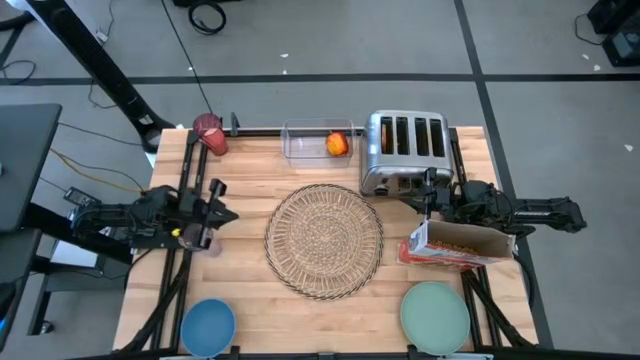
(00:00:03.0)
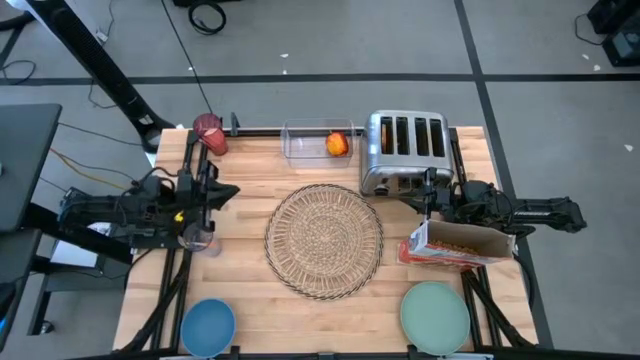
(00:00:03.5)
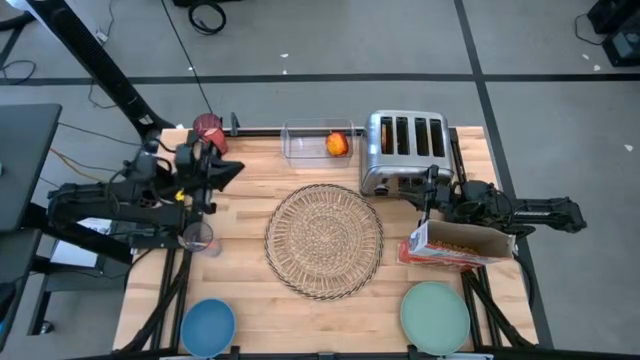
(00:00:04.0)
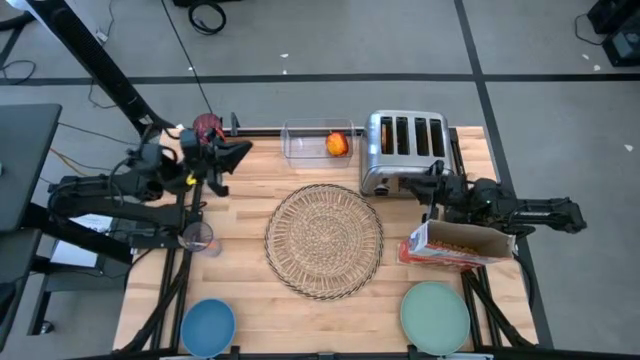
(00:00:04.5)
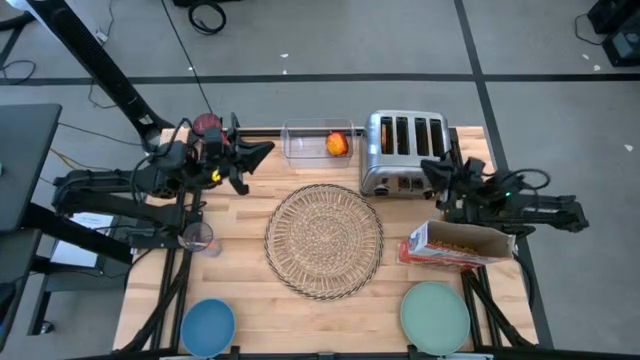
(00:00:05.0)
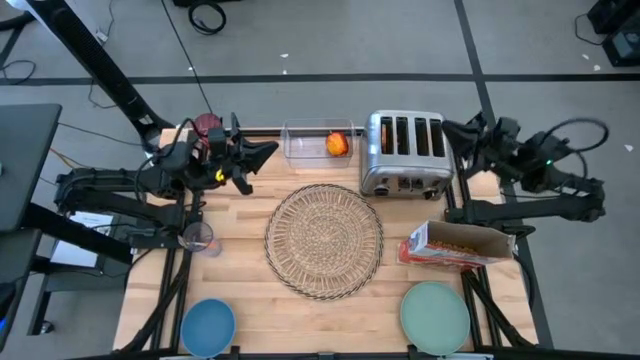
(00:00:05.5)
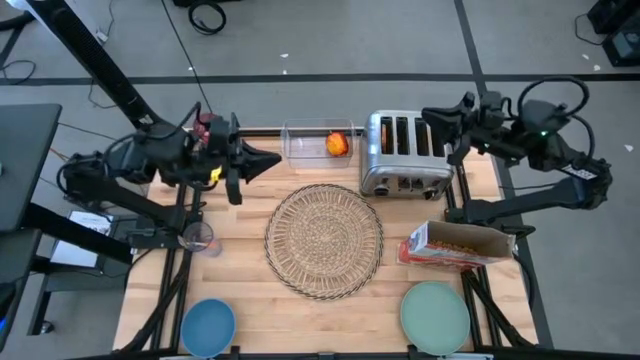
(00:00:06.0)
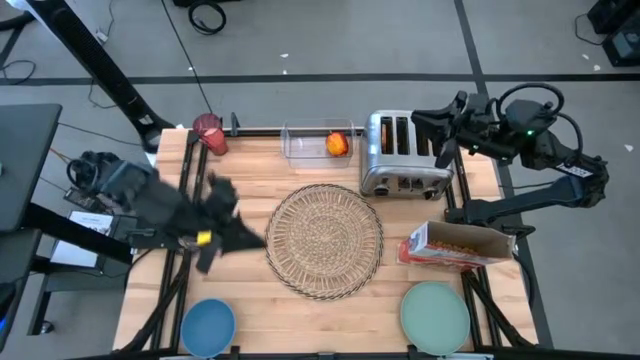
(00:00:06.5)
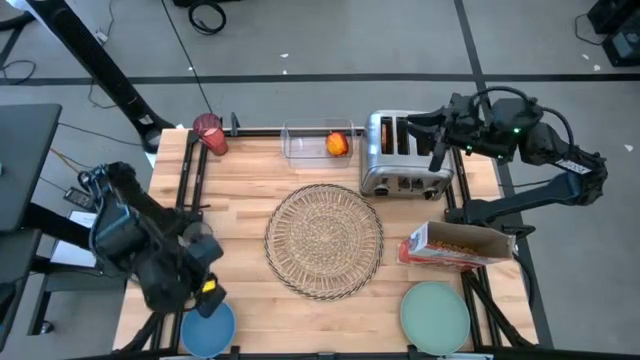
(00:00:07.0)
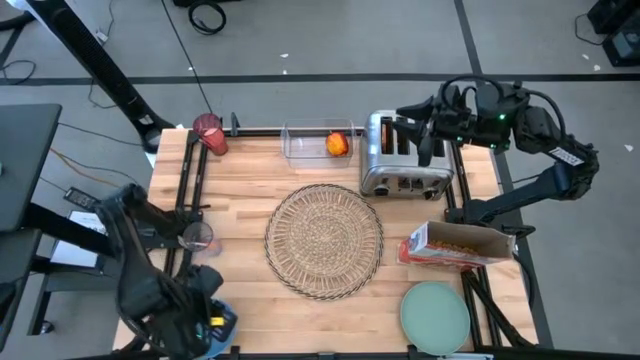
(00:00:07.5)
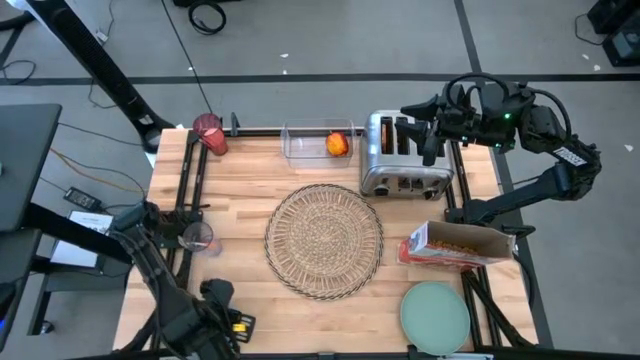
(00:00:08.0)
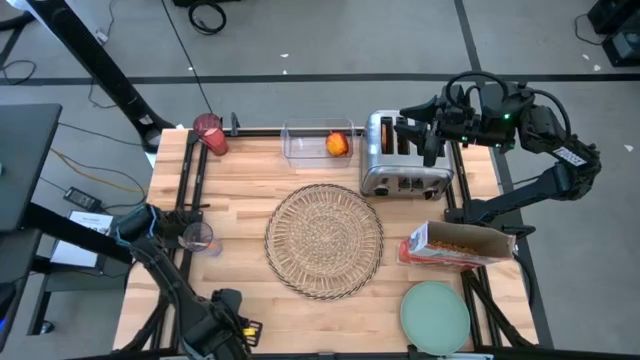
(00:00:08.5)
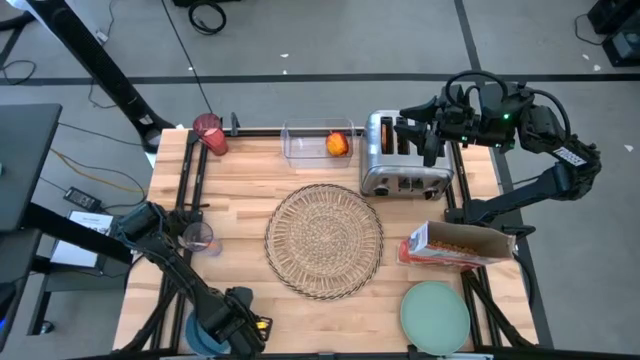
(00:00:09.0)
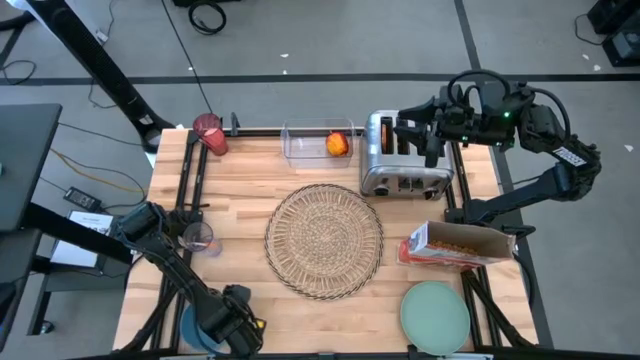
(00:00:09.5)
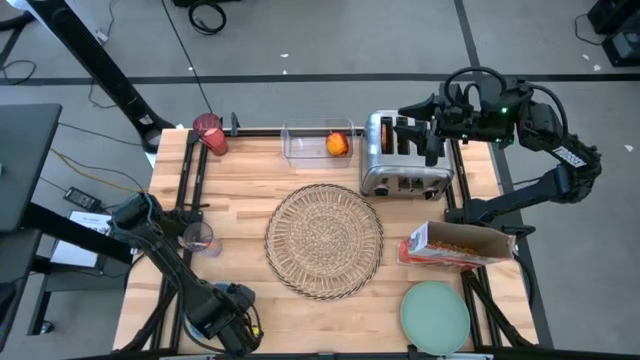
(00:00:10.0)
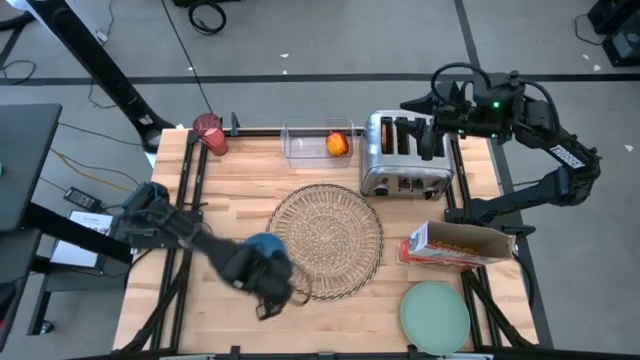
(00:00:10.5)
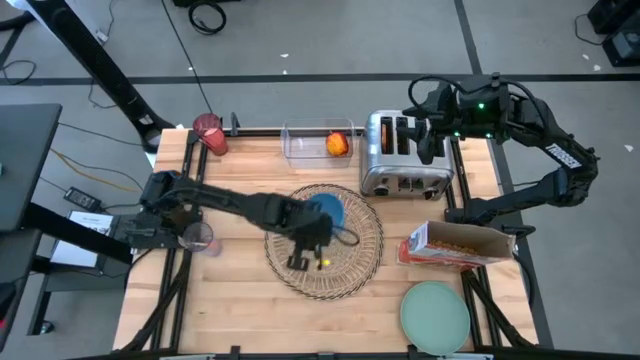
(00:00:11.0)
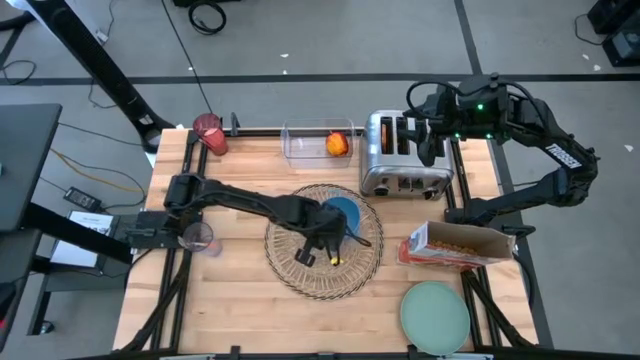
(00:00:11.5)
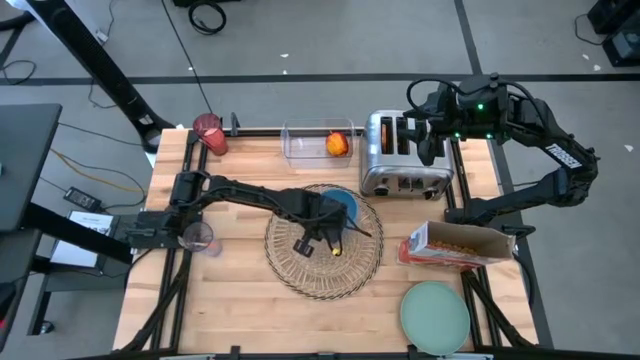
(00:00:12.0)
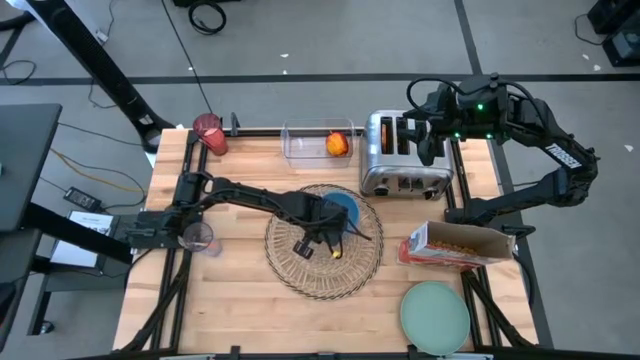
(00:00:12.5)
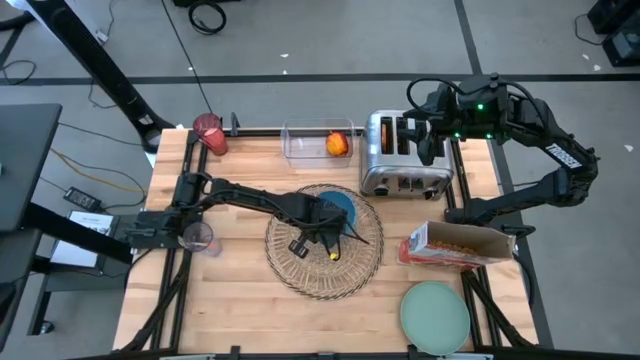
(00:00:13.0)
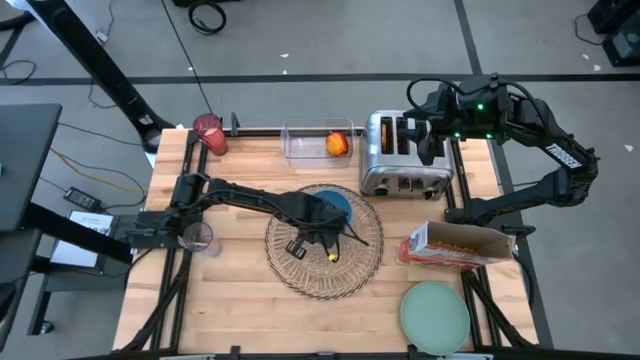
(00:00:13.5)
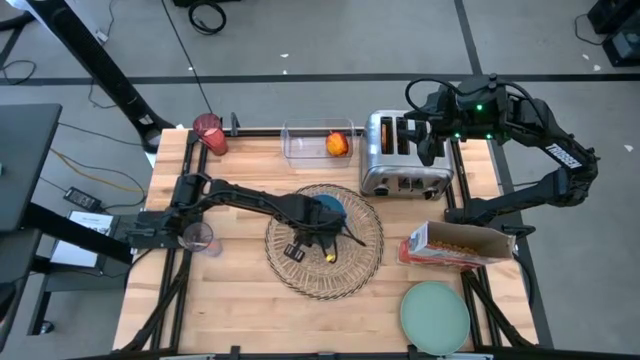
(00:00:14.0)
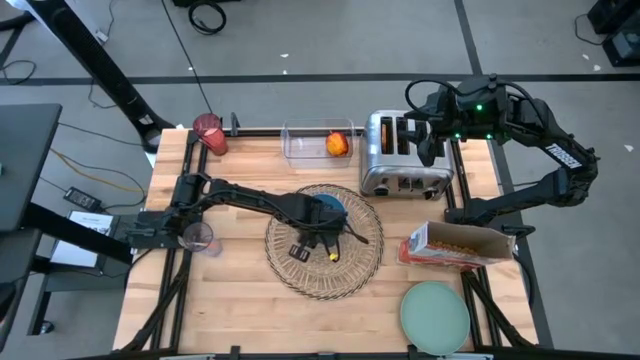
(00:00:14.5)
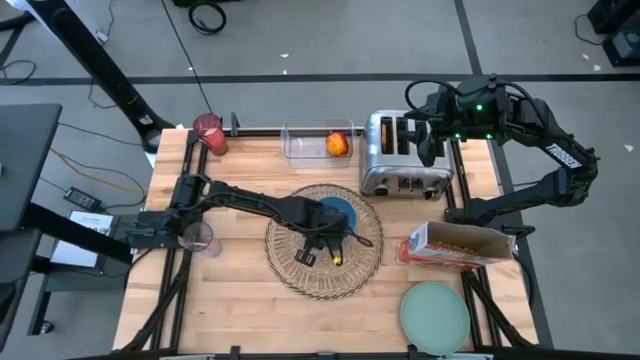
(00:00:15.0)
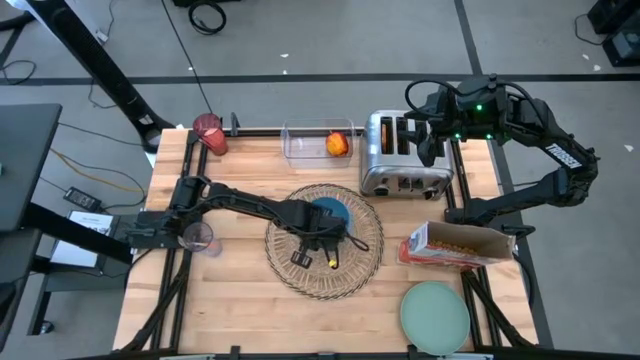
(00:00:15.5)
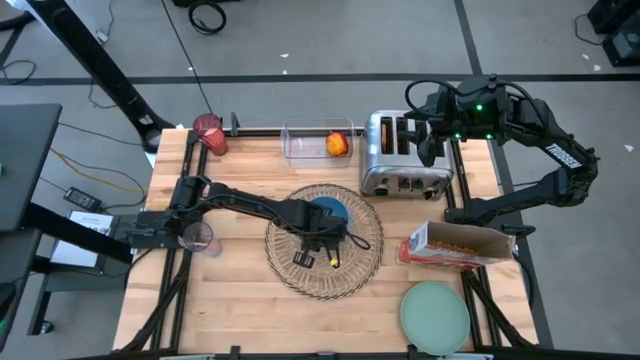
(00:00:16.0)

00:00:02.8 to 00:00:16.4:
Task: Arrange a breakfast setting
Put the blue bowl on the brown placemat
